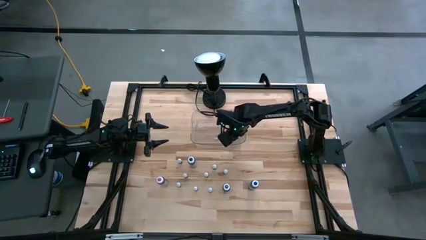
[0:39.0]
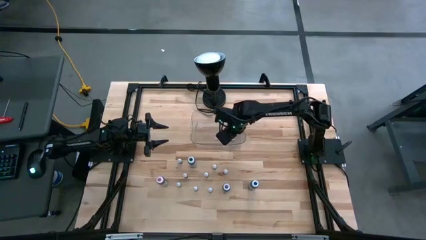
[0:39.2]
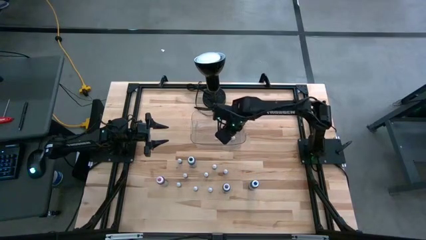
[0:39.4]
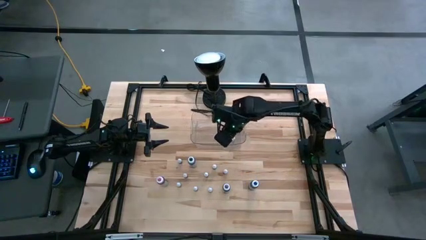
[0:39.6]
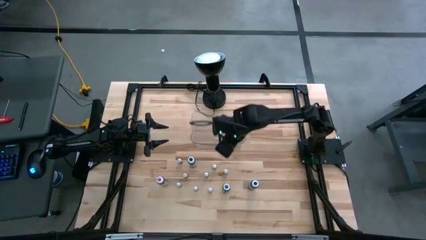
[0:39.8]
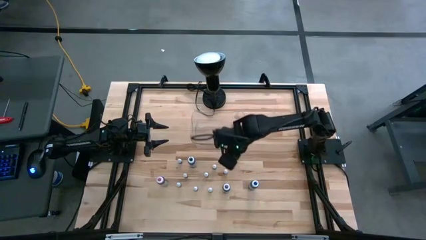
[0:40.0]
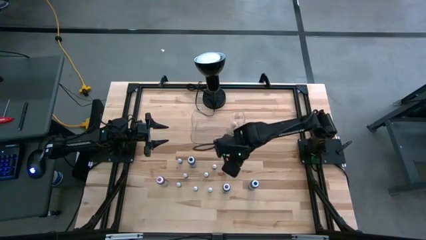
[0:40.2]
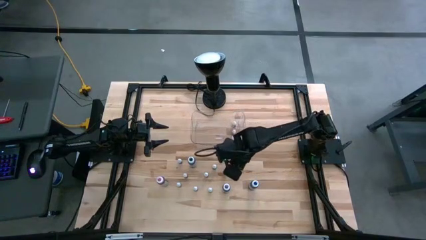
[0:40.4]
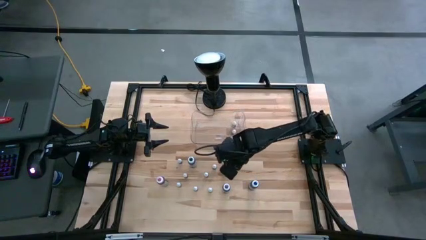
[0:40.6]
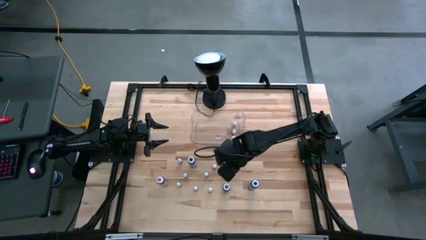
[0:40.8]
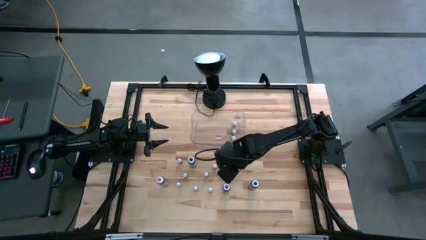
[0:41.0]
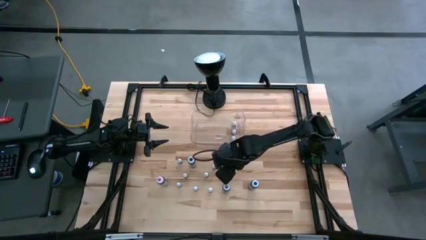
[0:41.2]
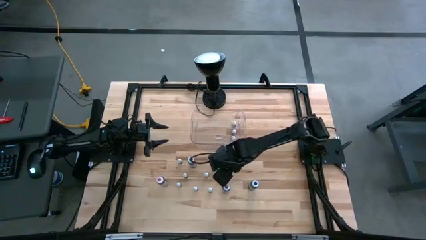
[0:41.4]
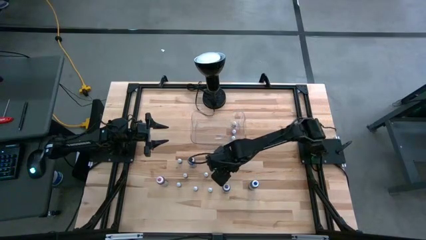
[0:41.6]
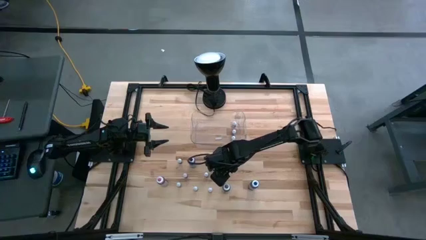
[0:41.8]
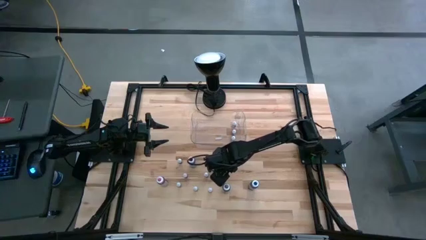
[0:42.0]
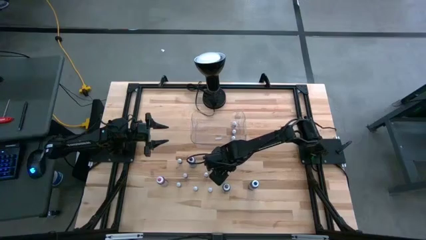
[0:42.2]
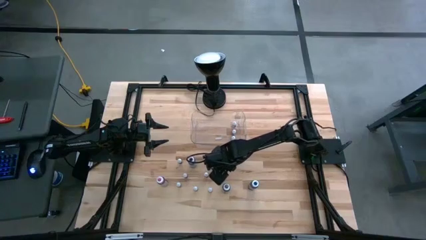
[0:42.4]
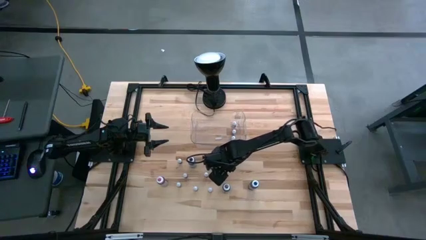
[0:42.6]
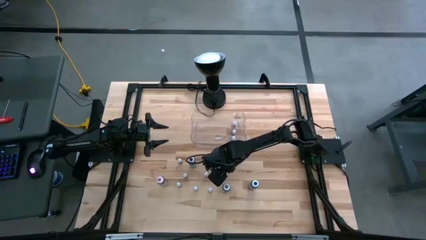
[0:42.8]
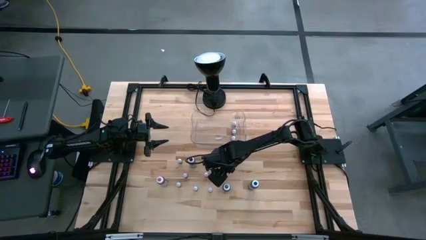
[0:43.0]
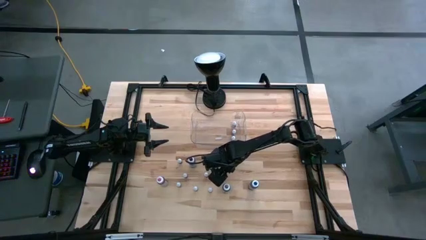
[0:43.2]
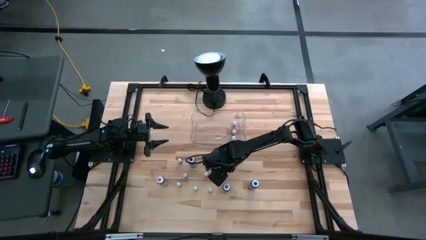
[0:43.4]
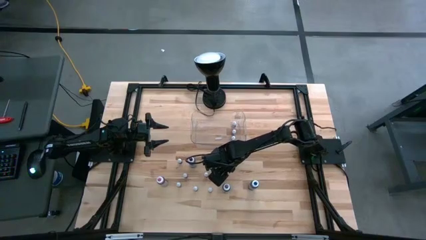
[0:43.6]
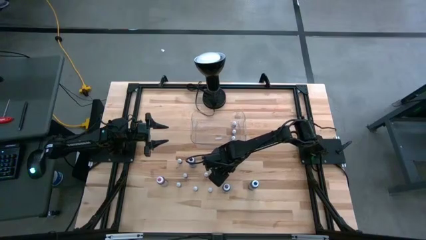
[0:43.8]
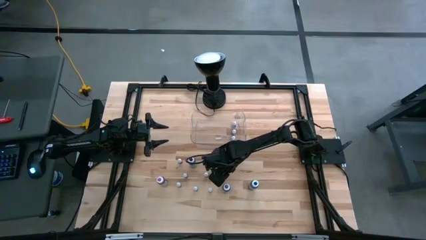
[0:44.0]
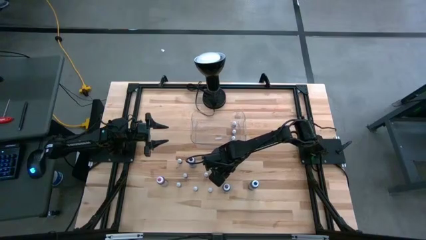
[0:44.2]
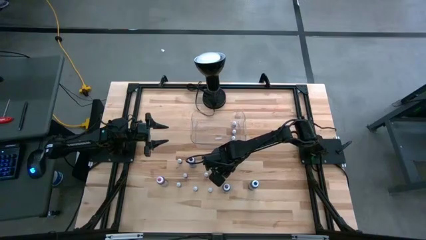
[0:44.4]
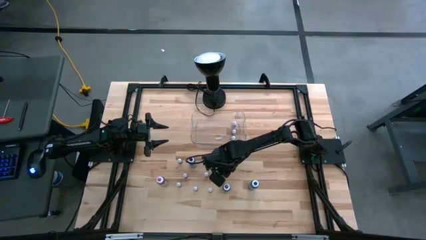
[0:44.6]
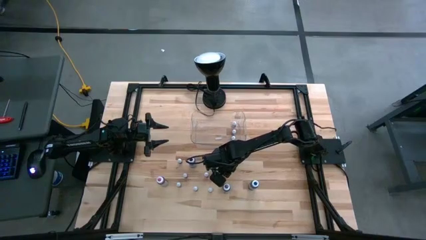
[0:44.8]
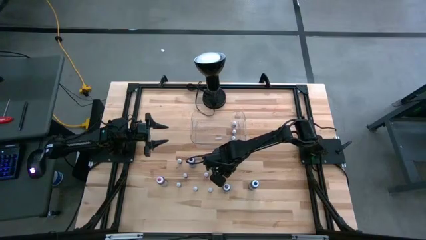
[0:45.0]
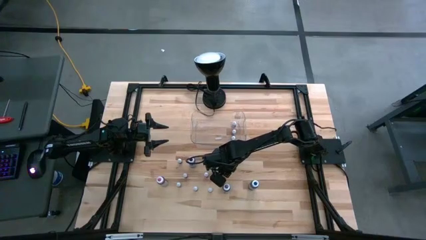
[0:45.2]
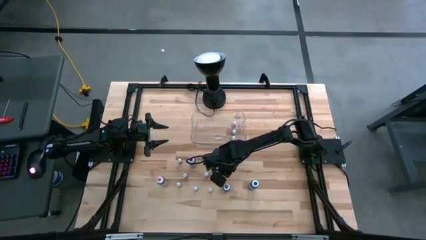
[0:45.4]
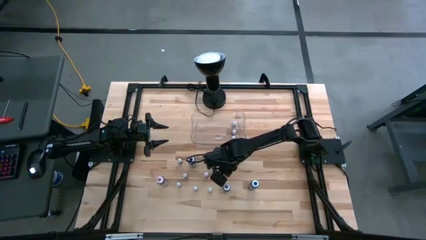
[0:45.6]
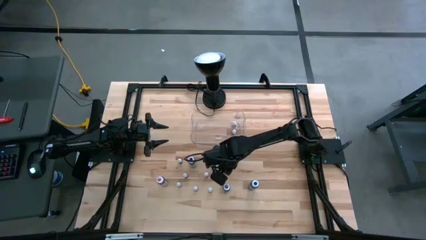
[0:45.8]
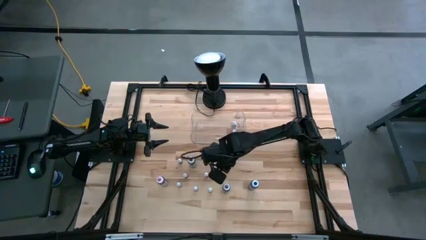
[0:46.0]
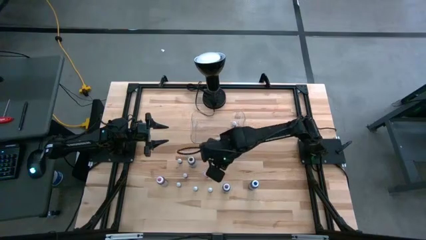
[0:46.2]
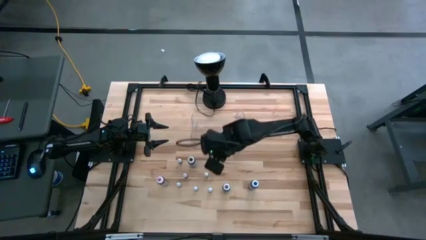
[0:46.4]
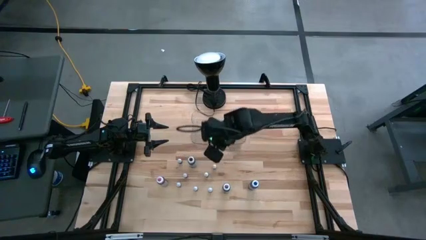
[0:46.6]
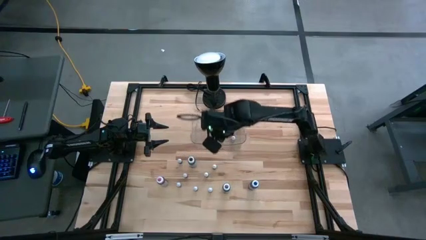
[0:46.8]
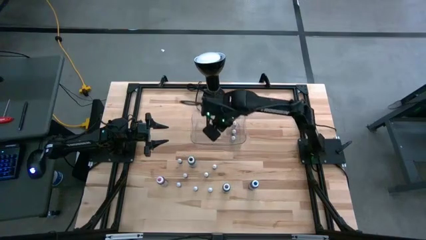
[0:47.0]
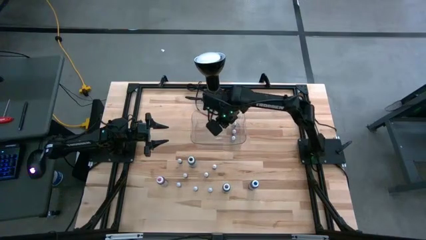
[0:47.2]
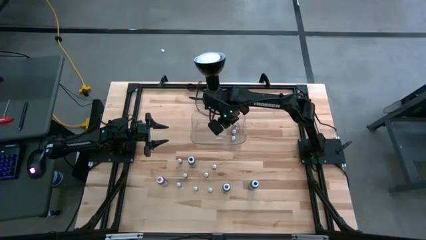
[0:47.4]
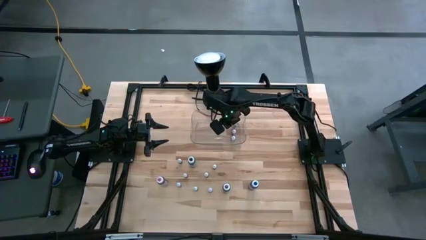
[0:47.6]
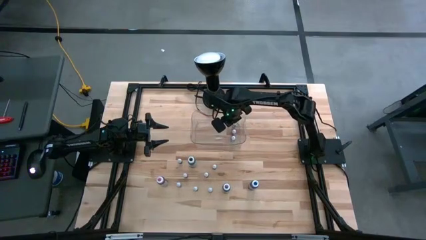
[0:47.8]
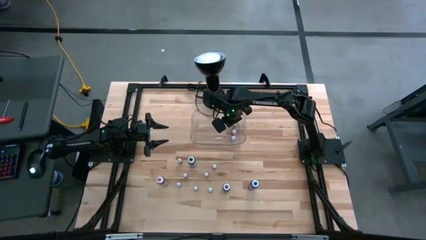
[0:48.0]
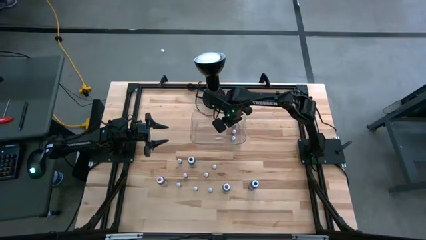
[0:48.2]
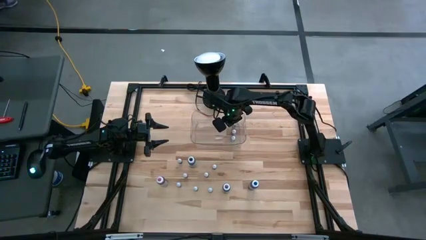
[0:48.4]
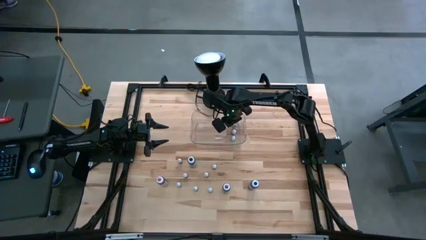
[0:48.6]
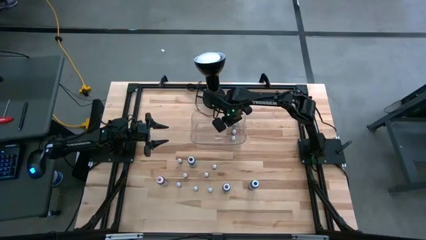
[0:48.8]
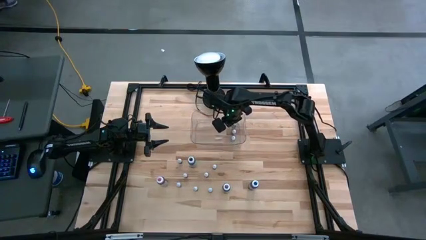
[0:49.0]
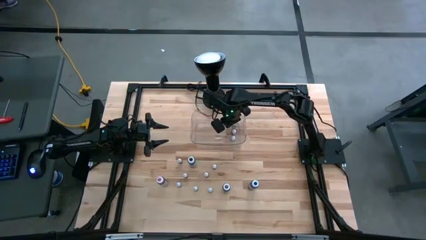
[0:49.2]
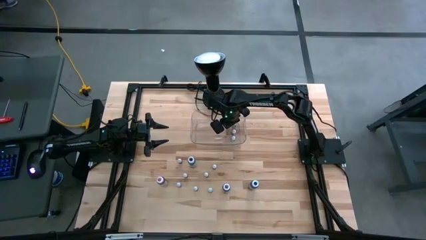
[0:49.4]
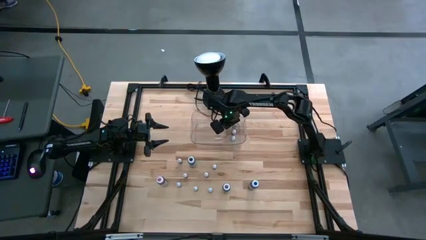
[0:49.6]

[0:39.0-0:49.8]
Task: Pick & Place food coloring
Put the top brown food coloring bottle into the transparent bin
